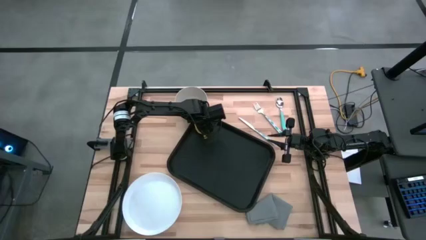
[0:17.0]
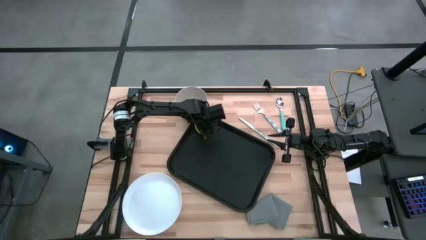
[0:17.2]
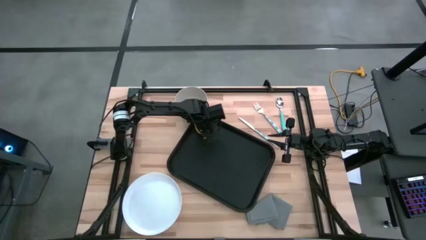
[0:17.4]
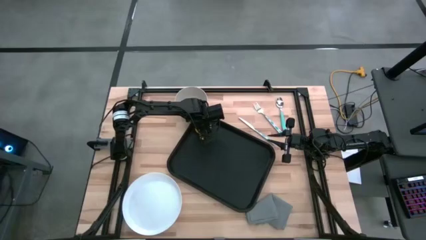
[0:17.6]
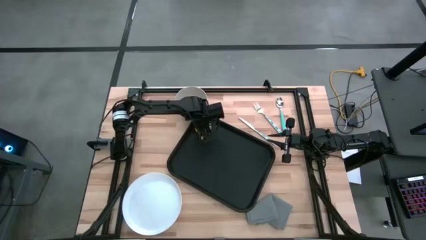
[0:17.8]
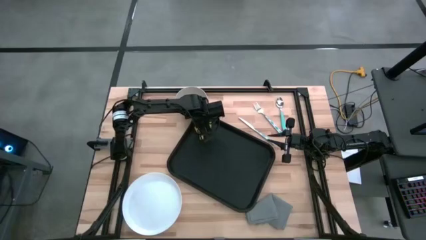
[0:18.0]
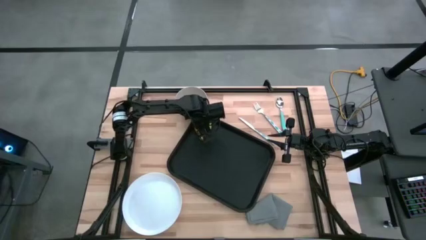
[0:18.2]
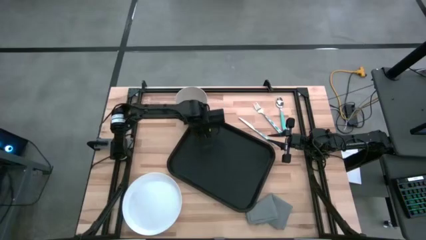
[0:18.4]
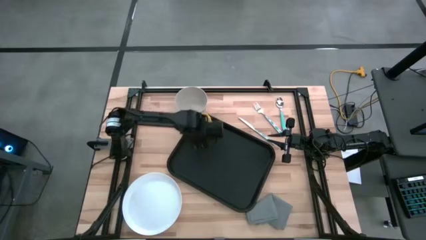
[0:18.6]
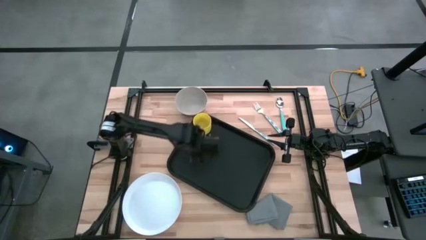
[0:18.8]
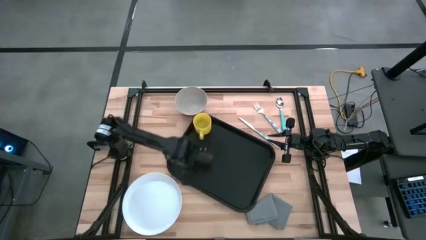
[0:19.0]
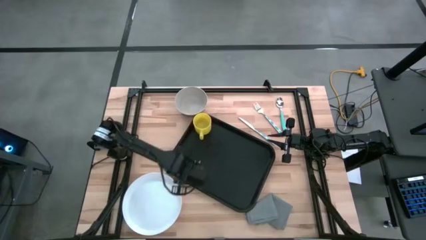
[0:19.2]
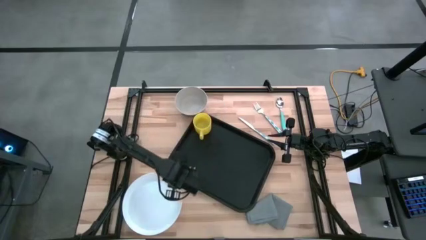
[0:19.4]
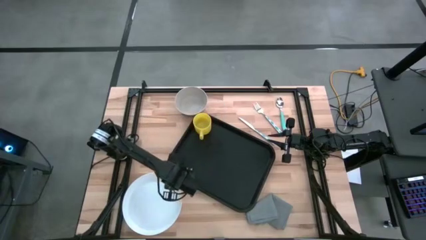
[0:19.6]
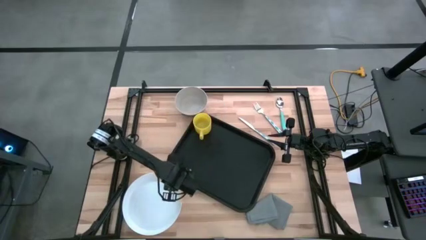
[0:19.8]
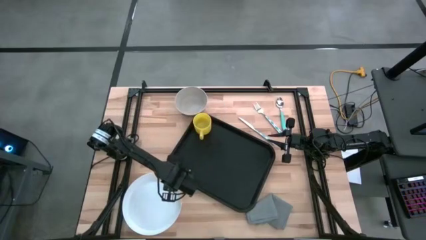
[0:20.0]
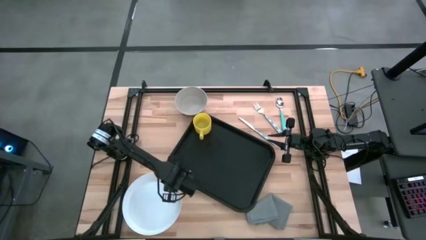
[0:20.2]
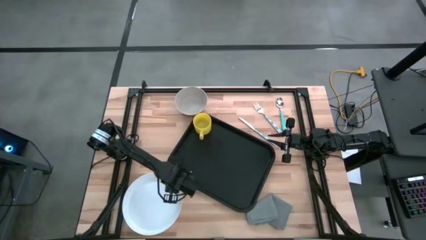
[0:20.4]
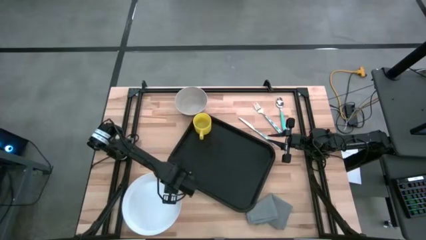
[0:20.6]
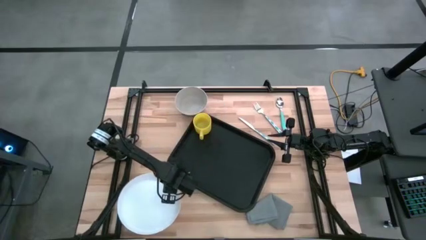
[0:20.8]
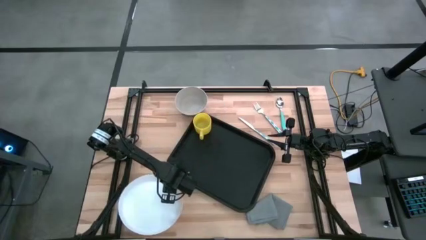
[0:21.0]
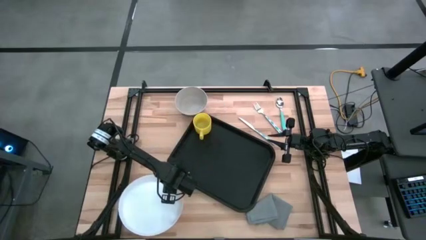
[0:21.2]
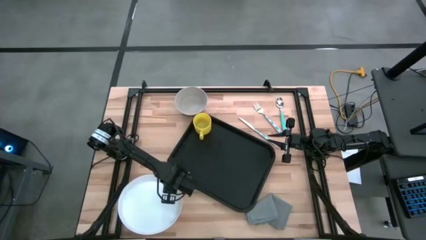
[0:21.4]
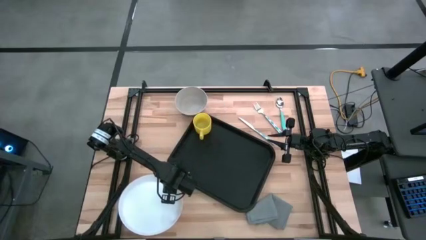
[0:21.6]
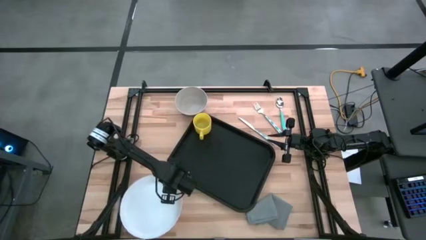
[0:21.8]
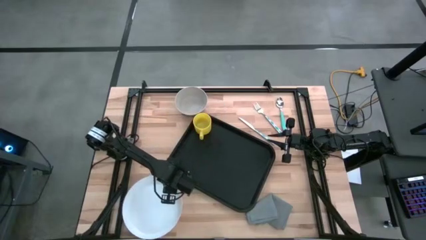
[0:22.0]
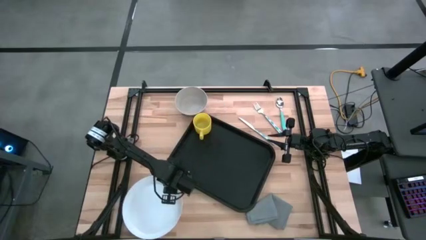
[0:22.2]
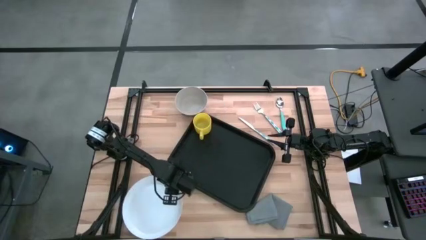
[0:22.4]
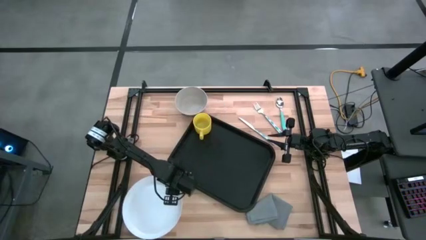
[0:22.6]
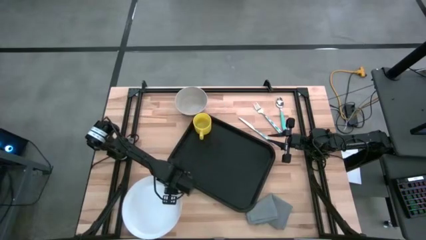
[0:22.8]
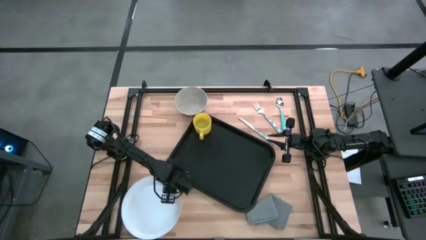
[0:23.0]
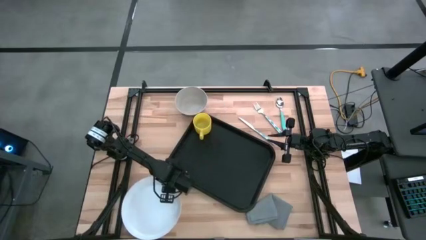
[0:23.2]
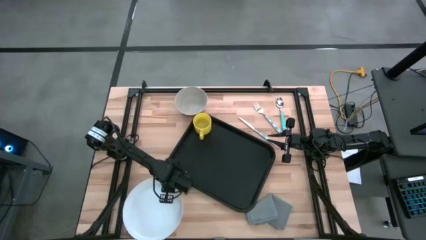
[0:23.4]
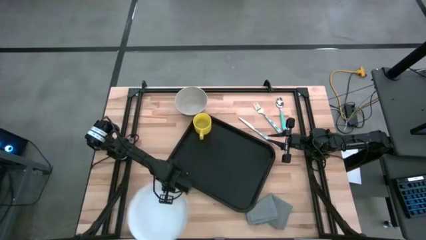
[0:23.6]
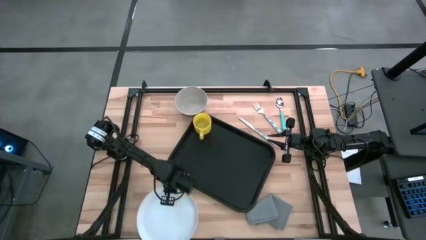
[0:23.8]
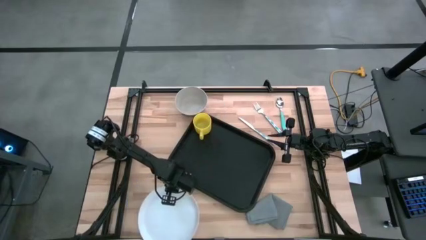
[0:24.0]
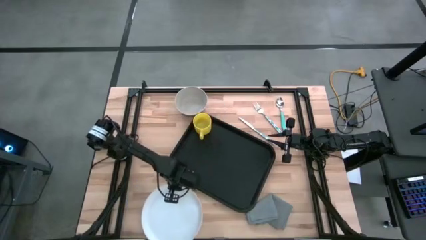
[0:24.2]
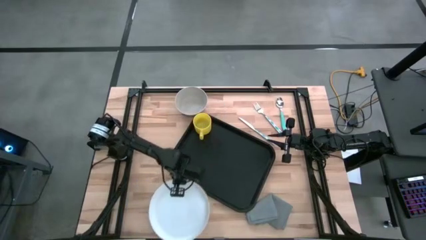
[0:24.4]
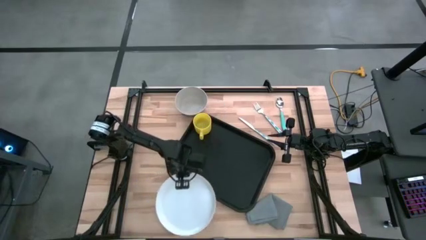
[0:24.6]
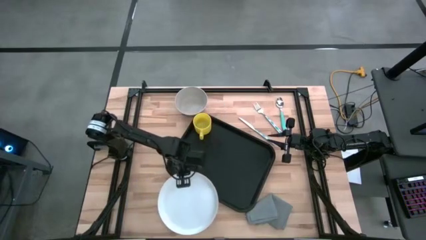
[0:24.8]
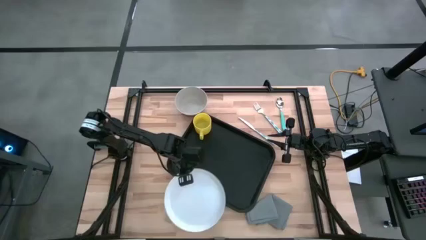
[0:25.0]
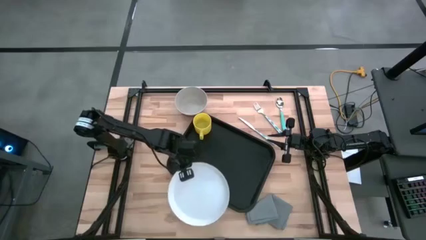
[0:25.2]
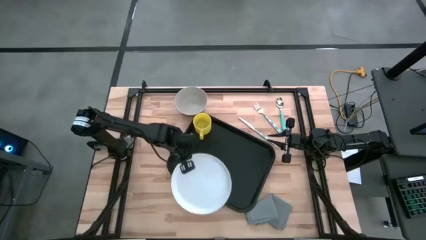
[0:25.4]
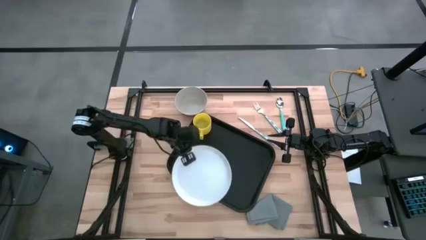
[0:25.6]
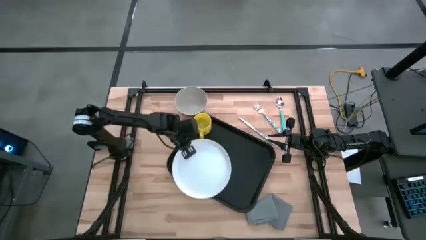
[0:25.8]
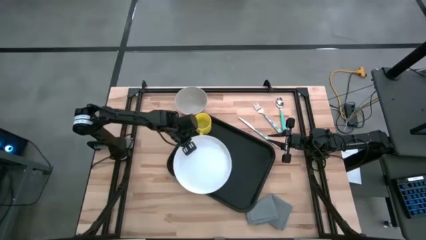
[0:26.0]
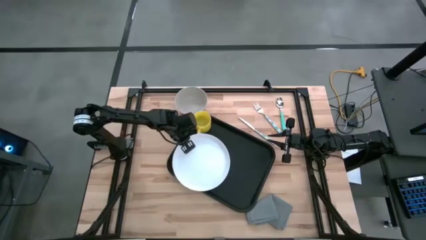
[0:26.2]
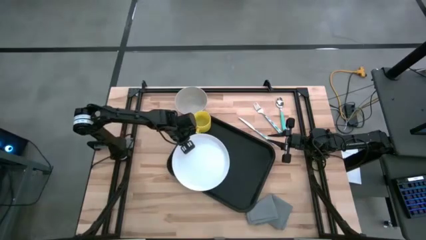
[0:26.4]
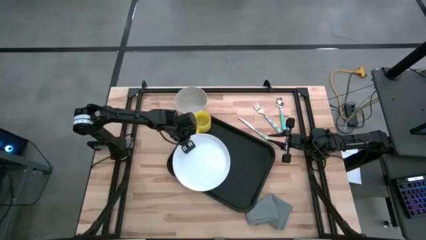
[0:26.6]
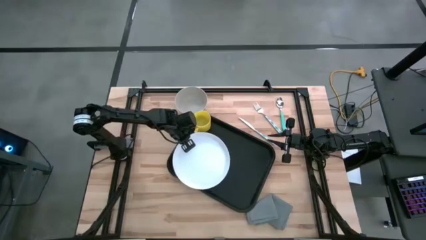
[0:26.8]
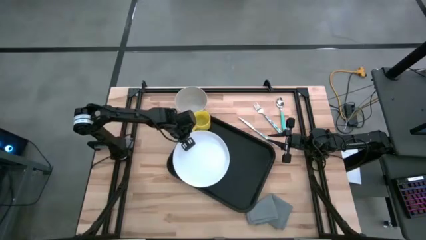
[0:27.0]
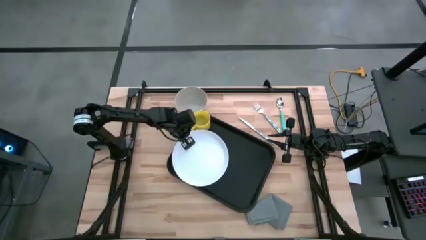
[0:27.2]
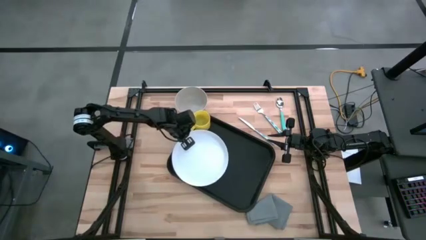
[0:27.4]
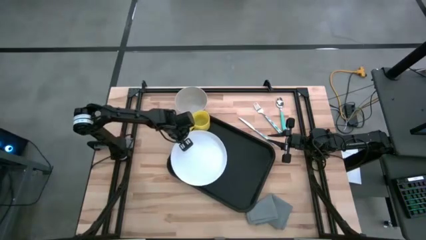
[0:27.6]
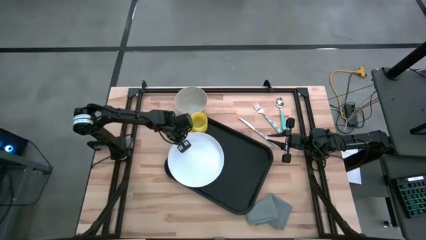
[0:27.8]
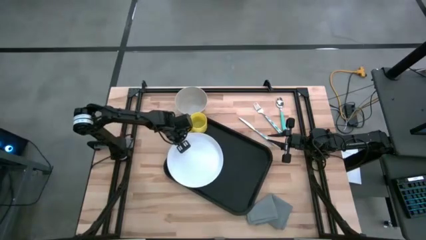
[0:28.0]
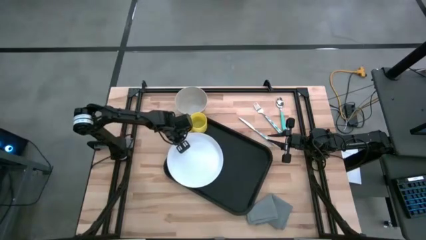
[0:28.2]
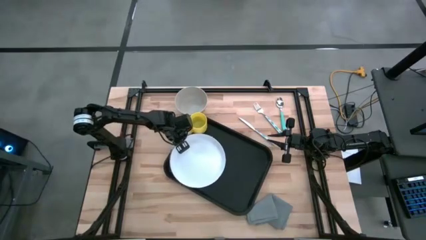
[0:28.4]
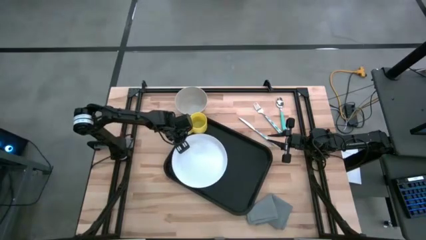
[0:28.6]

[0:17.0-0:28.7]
Task: Set up tray
Put the white plate on the black serving tray to the bottom right of the yellow mug
